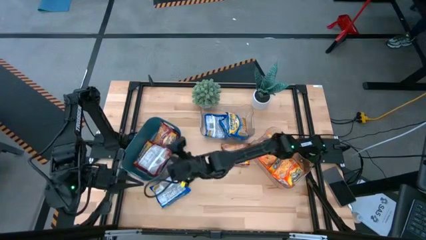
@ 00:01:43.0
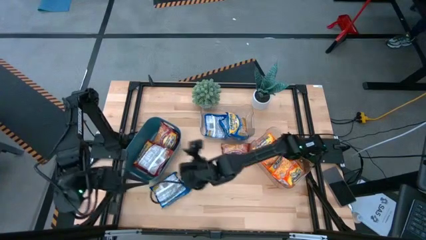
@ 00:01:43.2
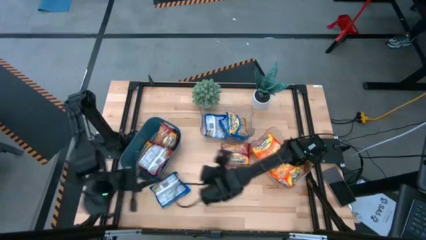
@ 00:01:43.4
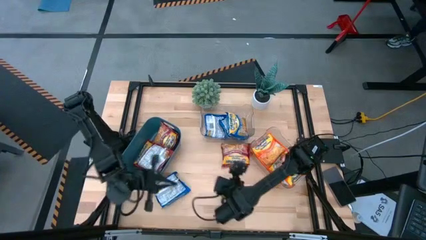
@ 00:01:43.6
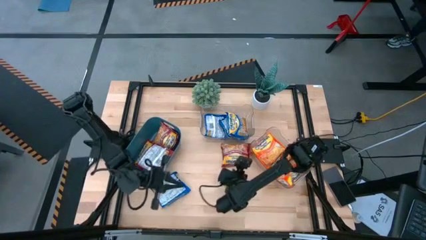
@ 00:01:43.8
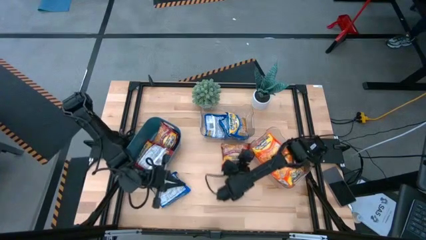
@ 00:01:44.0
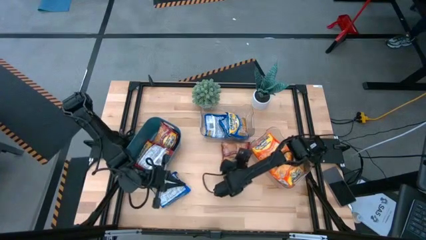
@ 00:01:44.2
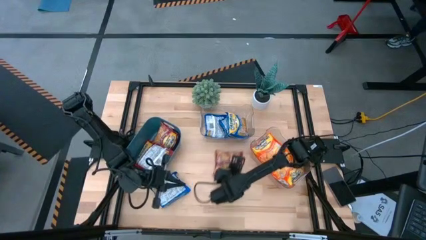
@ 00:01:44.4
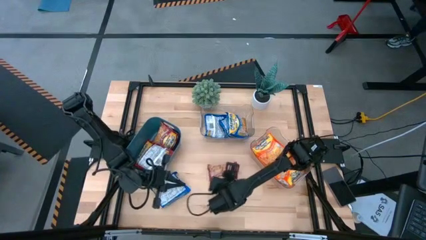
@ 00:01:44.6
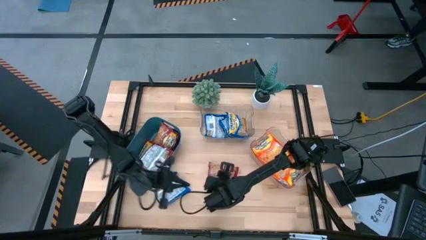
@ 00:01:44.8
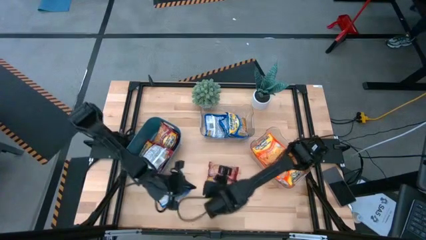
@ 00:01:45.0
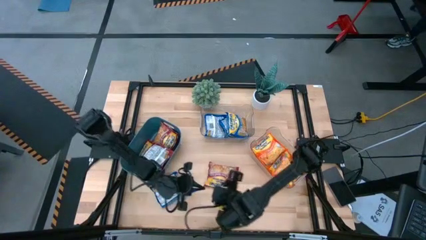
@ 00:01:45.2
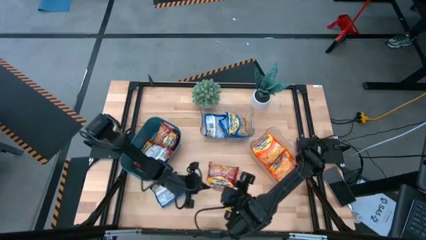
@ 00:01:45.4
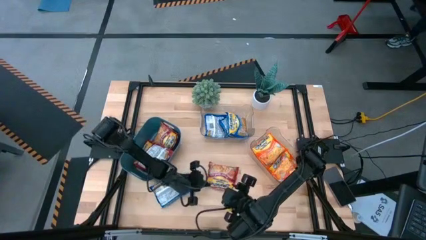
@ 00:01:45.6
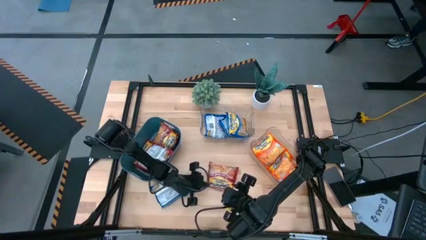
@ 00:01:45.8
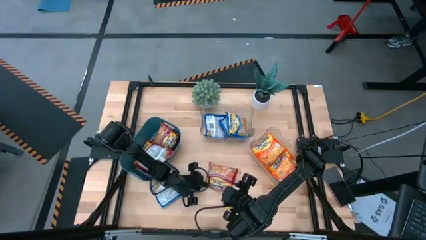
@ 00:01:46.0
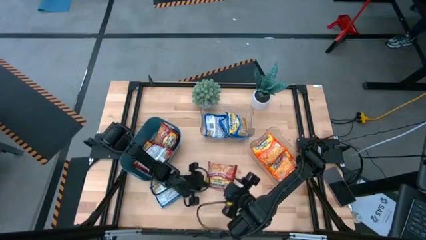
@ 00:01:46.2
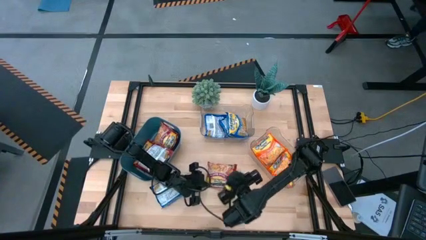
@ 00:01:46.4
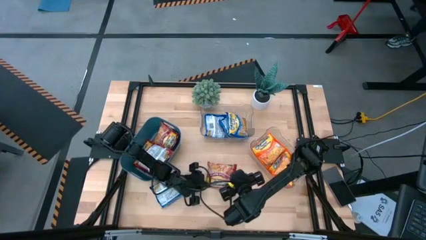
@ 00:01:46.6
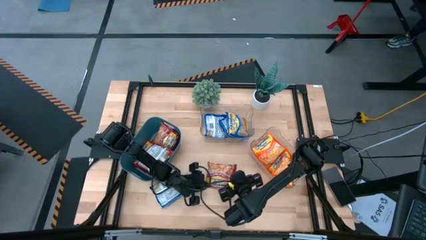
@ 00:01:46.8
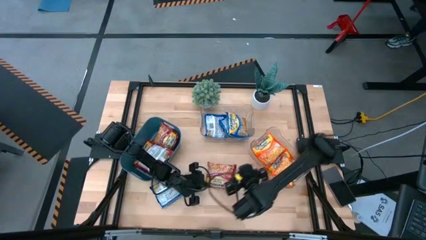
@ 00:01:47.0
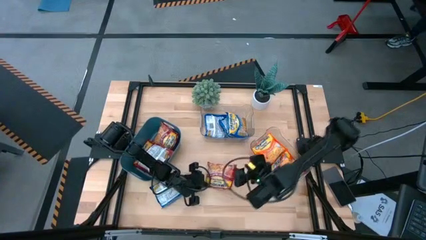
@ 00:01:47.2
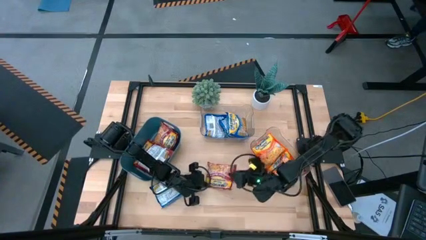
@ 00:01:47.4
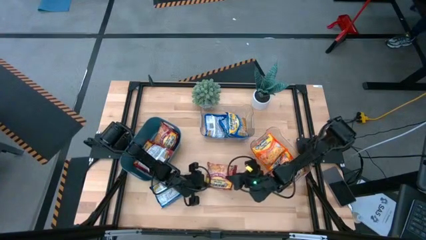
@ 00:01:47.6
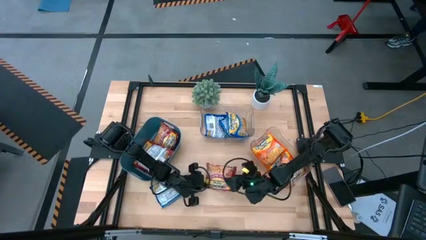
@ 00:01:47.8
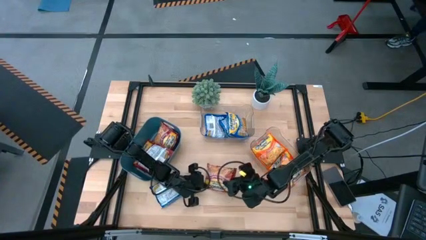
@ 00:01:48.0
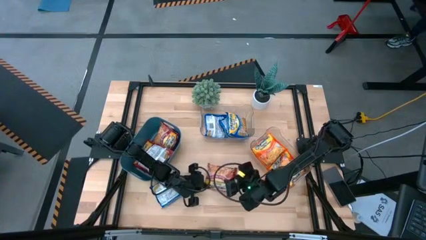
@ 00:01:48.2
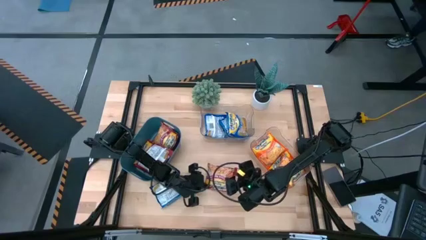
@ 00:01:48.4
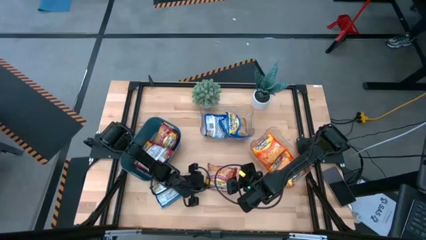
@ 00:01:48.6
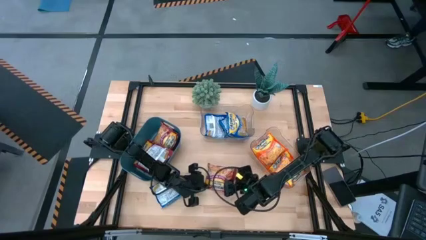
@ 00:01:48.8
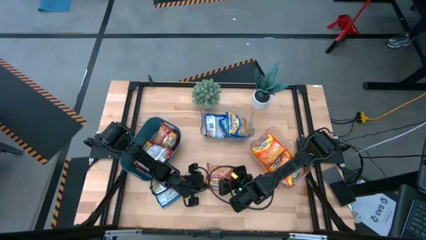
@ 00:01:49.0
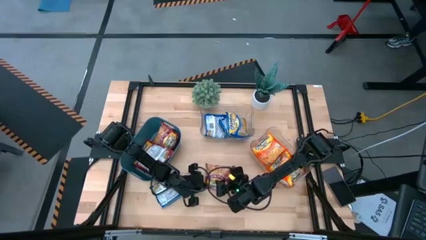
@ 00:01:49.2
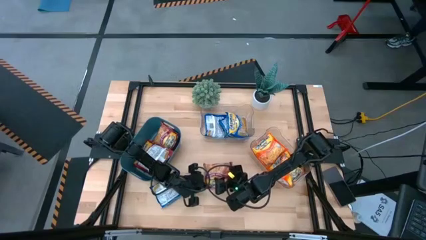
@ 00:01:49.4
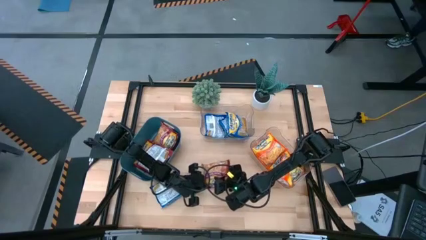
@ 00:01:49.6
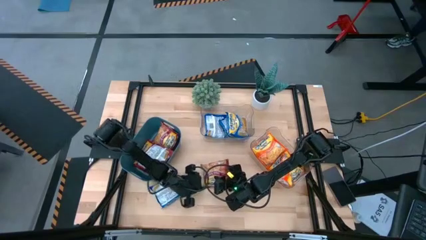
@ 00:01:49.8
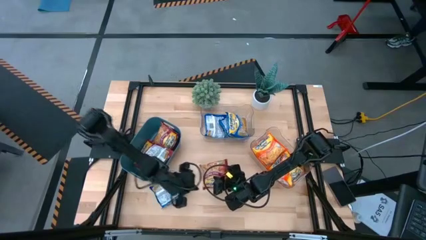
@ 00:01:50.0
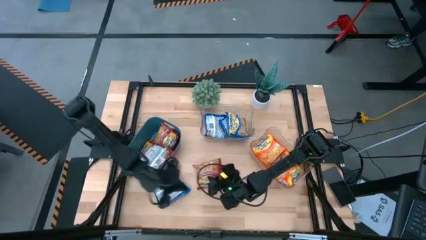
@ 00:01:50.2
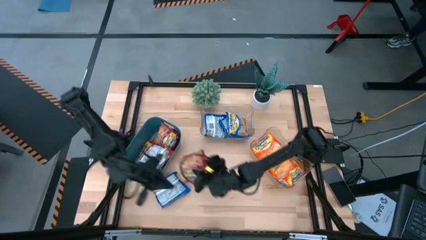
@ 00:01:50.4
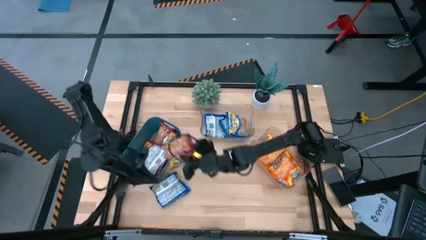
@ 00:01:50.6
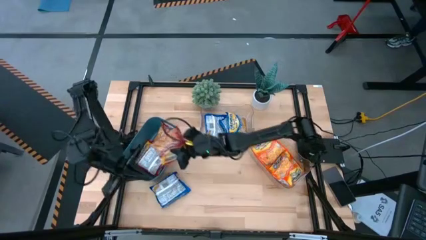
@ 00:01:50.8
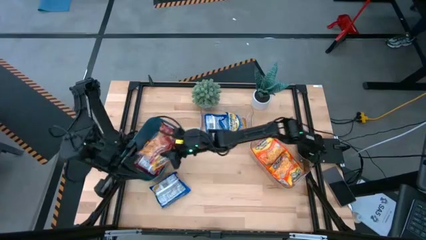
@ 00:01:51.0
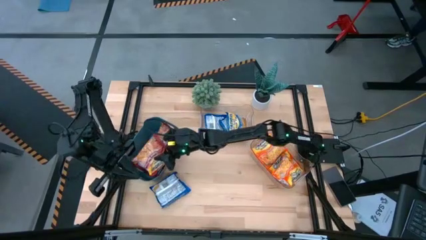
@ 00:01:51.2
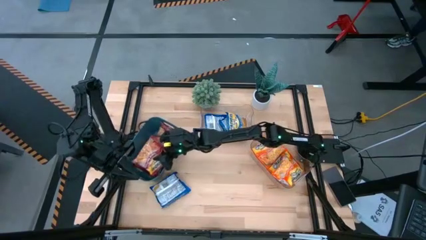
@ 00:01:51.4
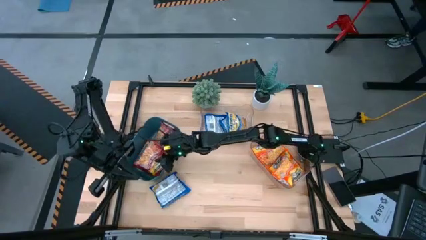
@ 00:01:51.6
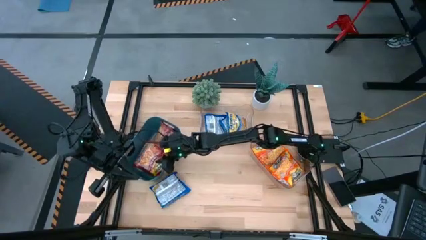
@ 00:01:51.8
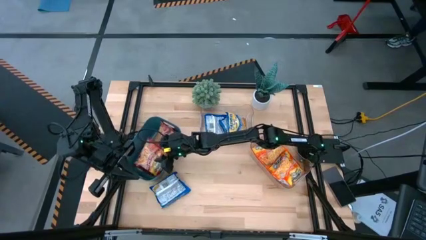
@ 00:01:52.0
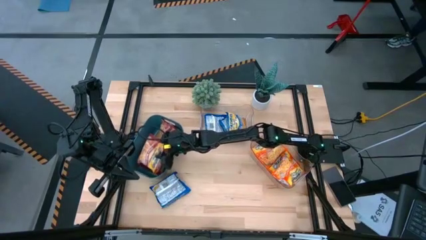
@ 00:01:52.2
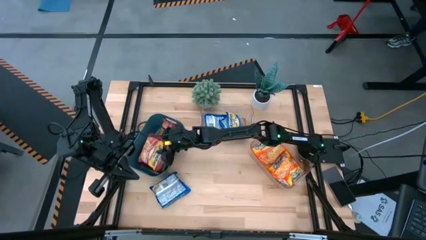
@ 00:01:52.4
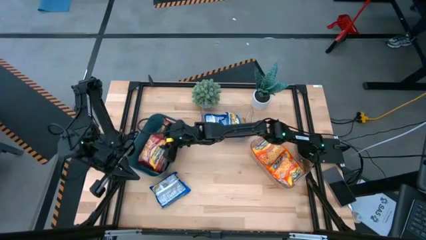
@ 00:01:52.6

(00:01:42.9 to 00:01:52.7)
Task: Sort Maruchan noodles
Stack the red noodle pack on top of the red noodle pack in the blue bin

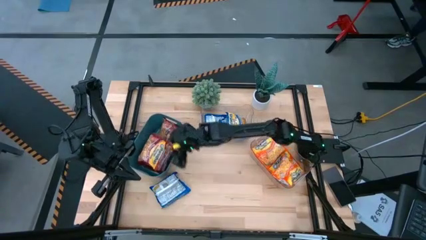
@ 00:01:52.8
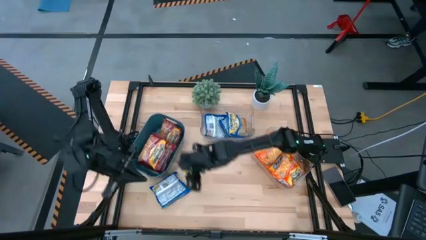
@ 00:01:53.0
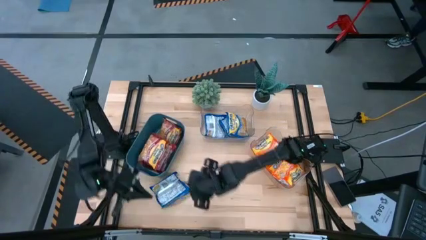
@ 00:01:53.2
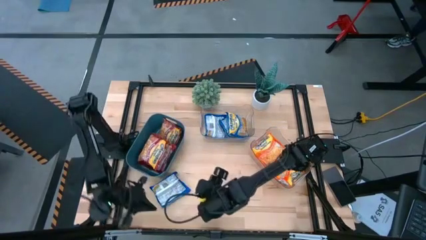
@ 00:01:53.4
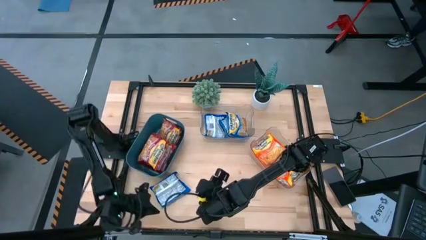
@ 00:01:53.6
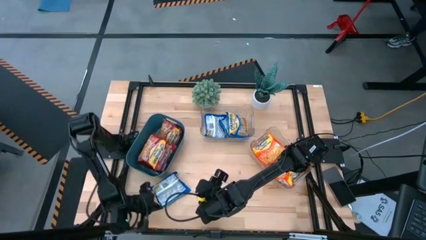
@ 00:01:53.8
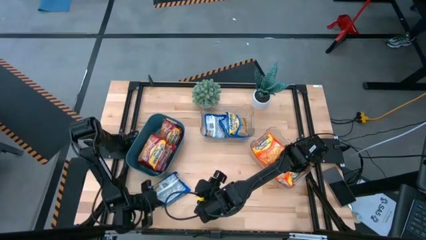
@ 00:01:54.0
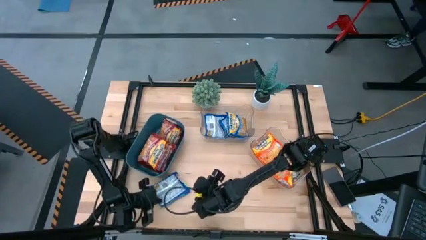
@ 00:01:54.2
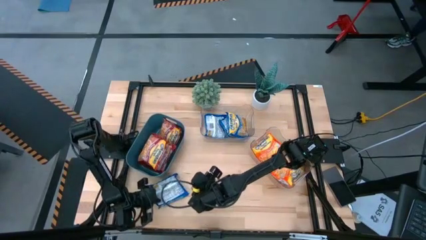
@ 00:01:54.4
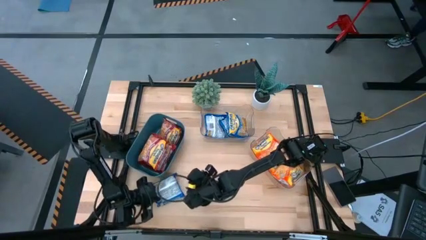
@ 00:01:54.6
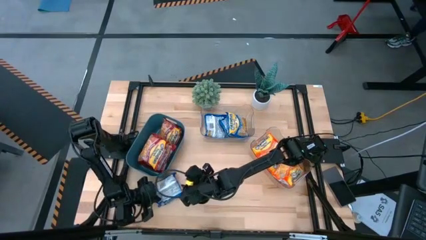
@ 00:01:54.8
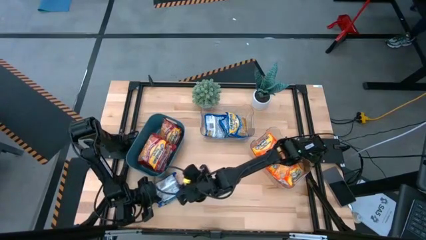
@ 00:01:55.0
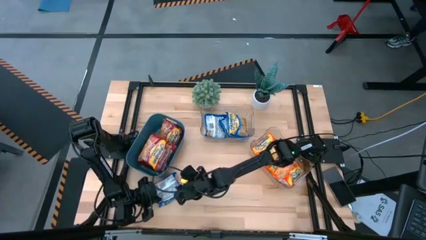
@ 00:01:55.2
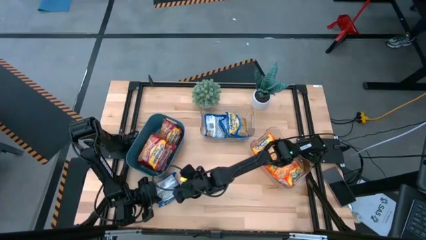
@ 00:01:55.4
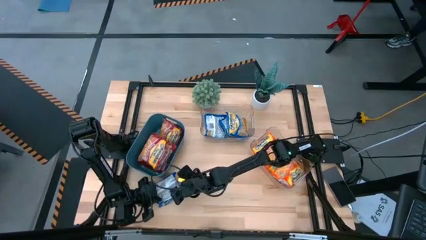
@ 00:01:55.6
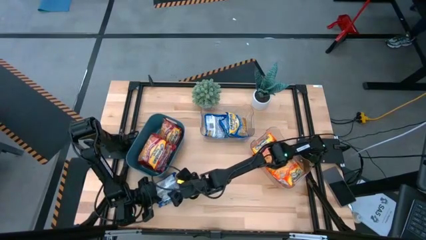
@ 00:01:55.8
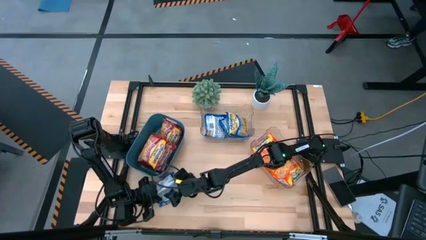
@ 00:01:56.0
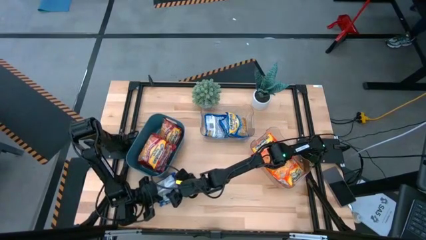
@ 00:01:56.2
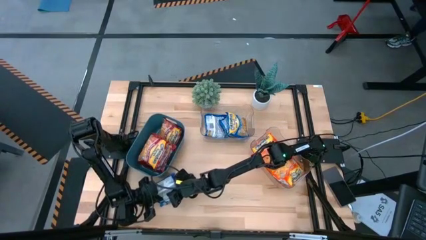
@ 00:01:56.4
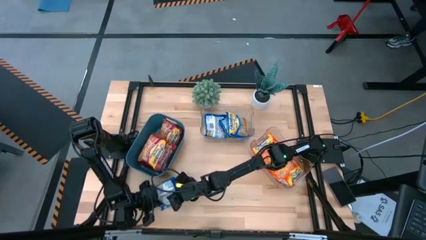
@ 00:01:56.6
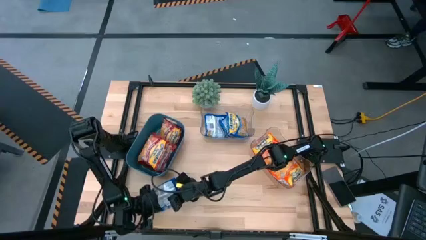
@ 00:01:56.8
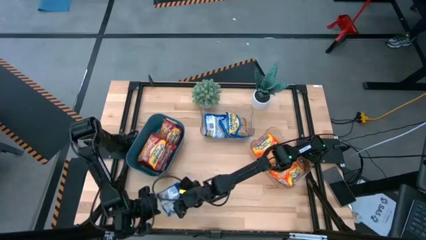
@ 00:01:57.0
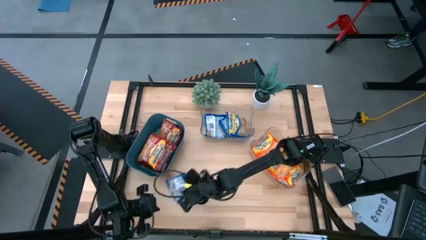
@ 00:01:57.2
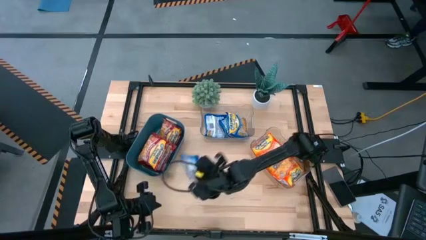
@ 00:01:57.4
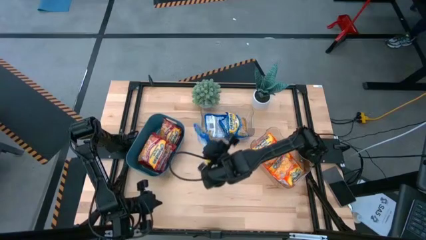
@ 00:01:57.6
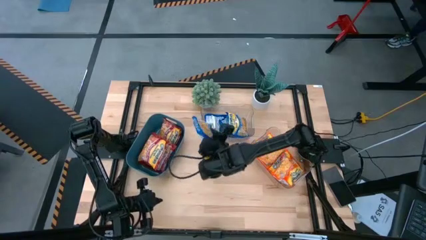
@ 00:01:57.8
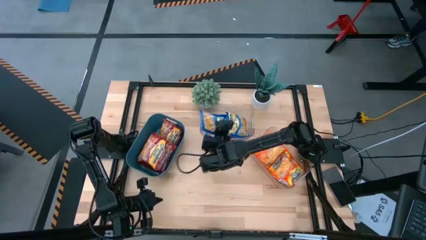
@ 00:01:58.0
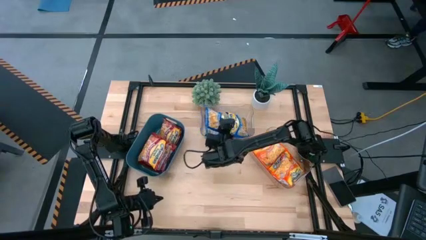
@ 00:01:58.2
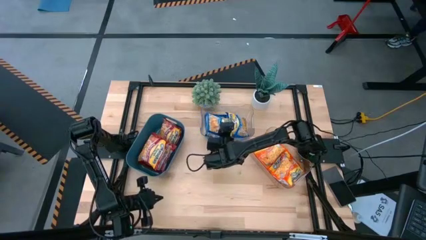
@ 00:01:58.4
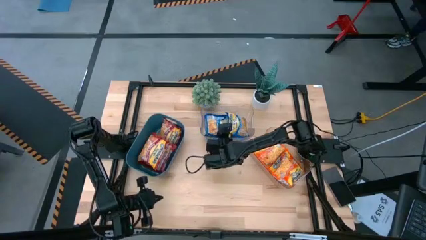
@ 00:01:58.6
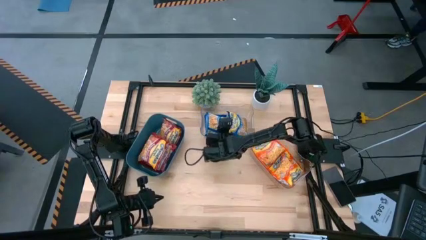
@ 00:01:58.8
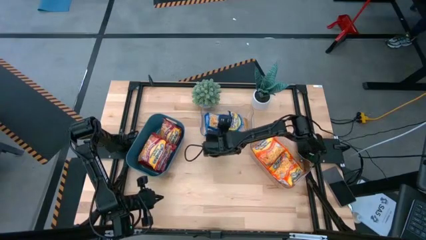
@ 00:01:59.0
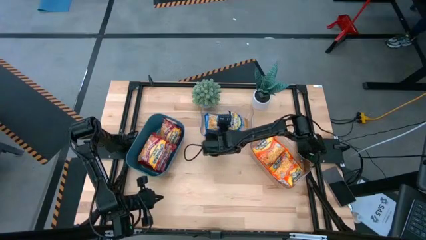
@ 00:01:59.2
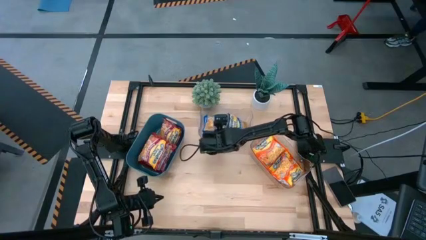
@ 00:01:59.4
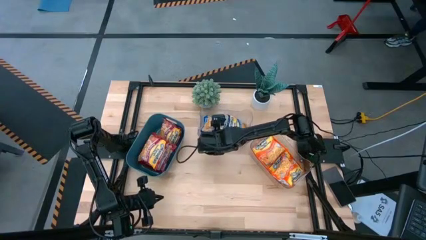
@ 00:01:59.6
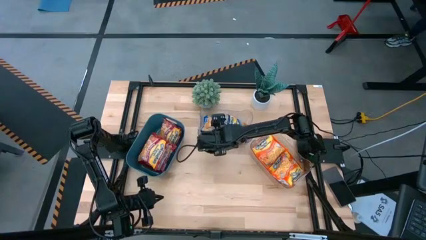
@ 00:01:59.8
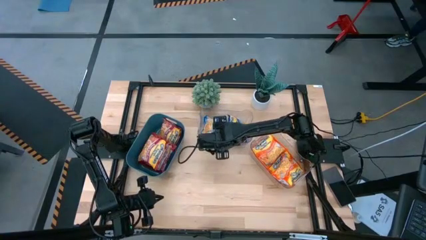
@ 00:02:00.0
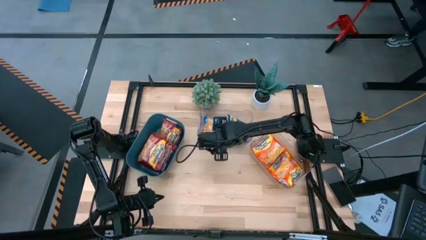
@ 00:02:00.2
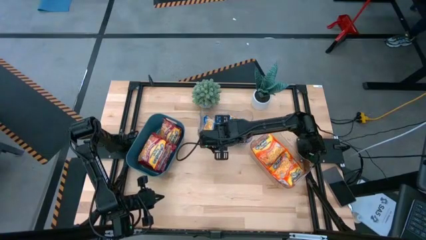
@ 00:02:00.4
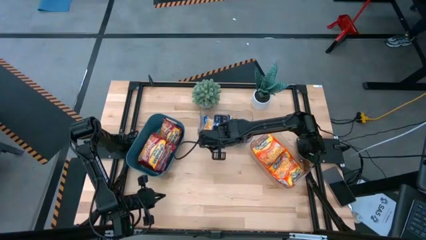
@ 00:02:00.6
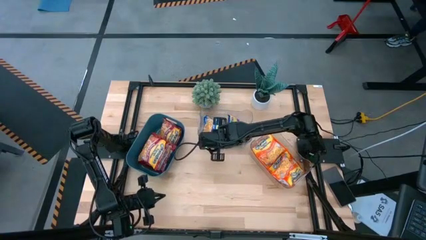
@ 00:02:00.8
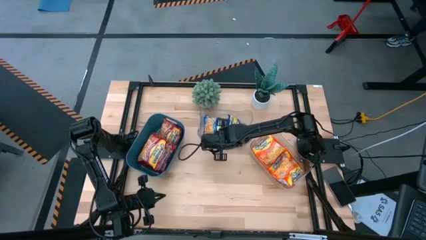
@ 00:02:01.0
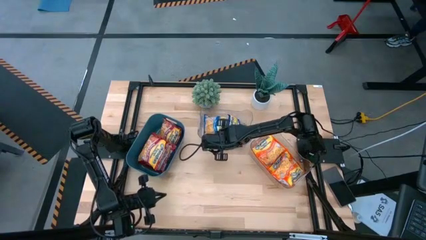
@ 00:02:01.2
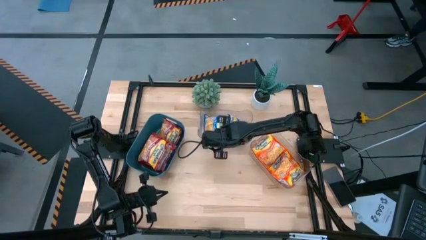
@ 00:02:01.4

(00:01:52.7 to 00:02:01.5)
Stack the blue noodle pack on top of the blue noodle pack in the left transparent bin
